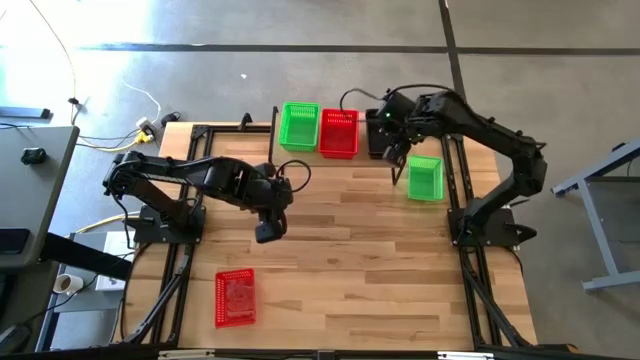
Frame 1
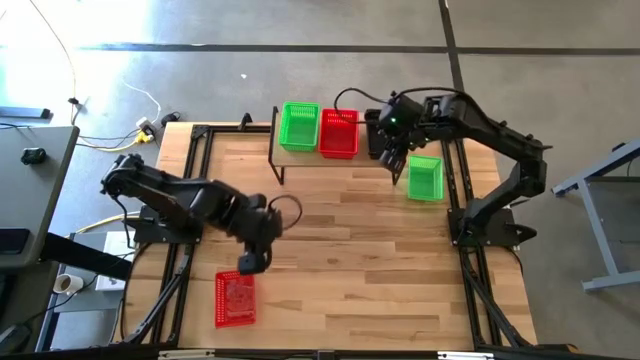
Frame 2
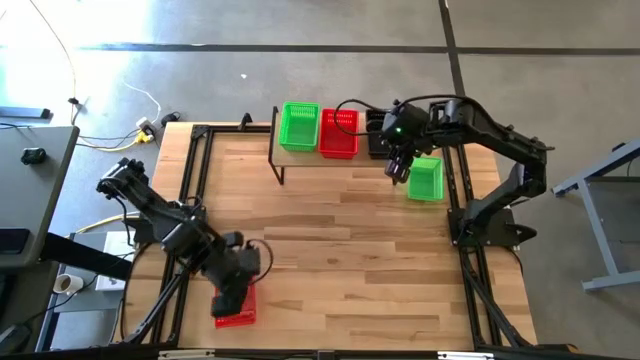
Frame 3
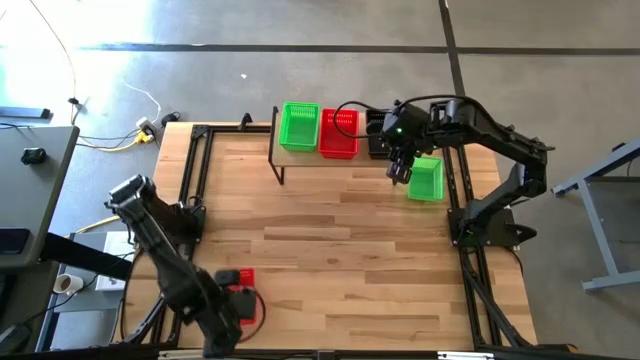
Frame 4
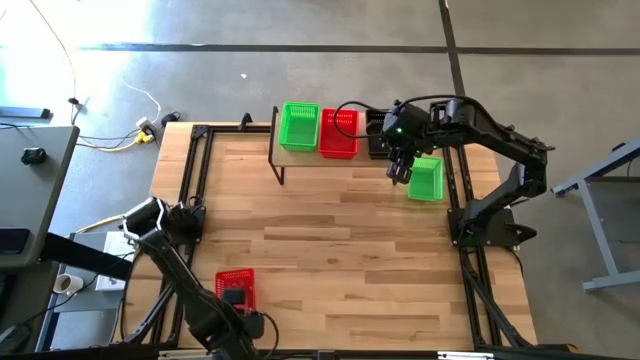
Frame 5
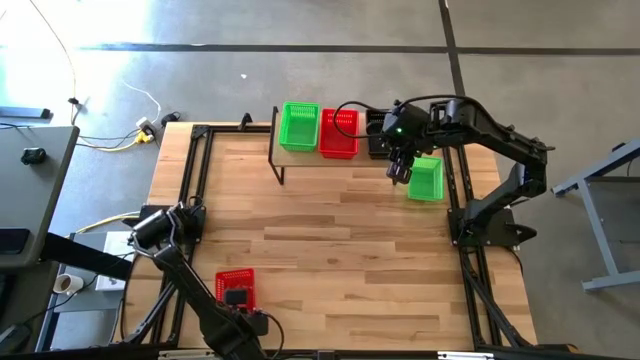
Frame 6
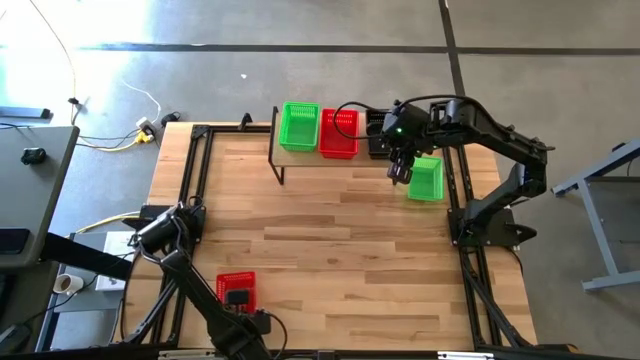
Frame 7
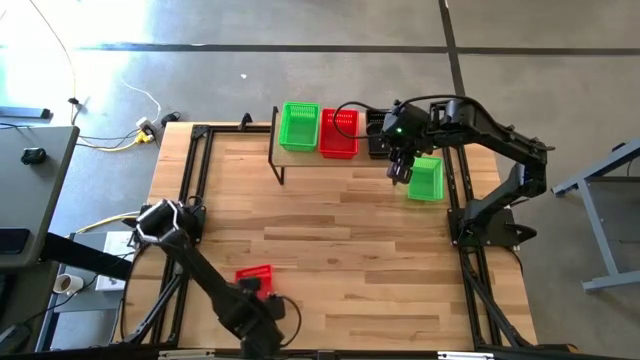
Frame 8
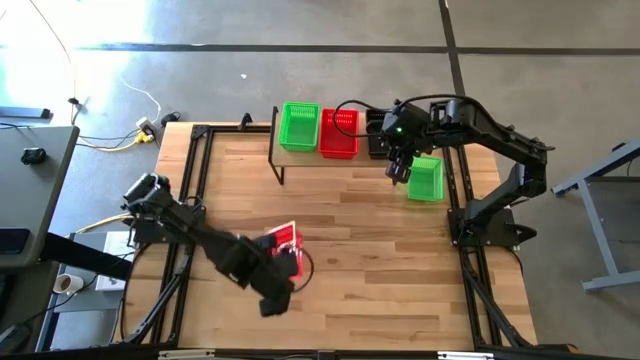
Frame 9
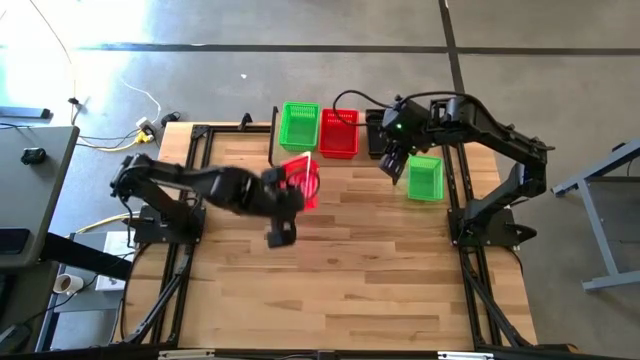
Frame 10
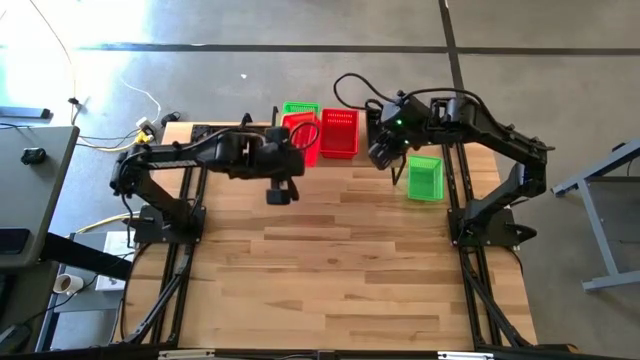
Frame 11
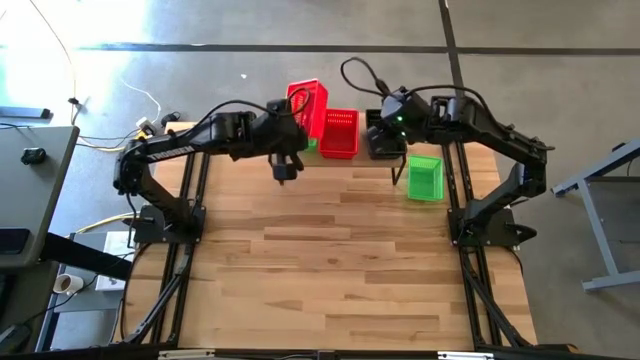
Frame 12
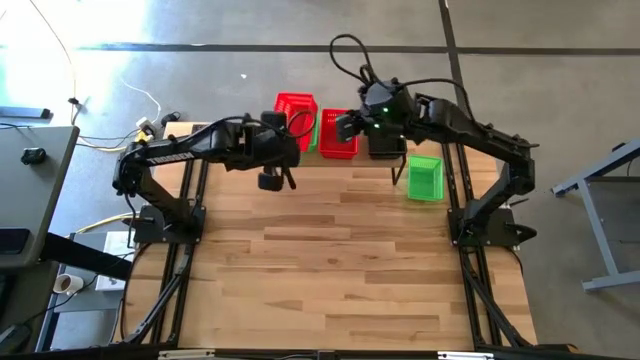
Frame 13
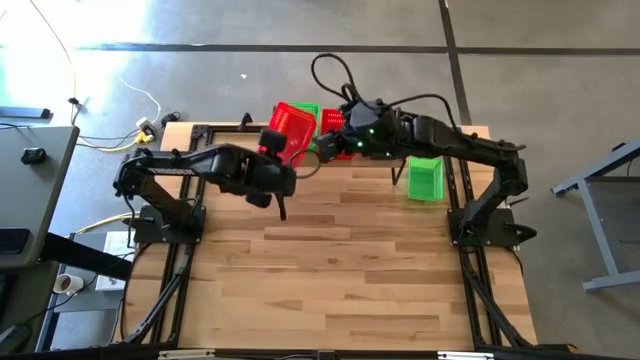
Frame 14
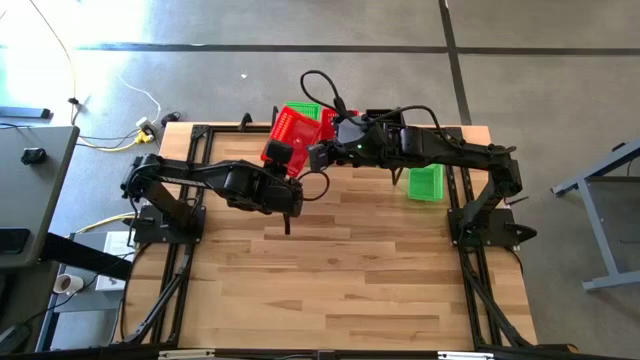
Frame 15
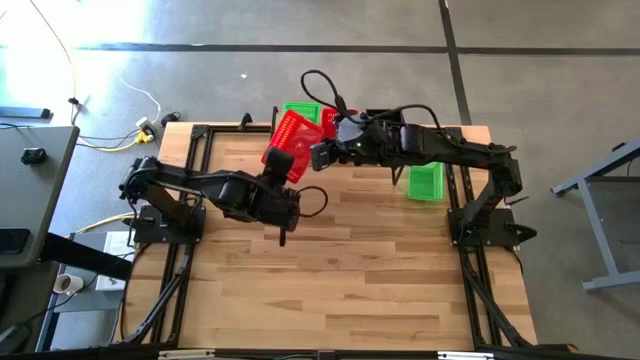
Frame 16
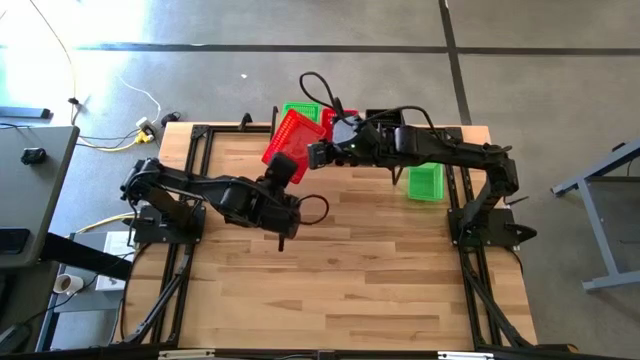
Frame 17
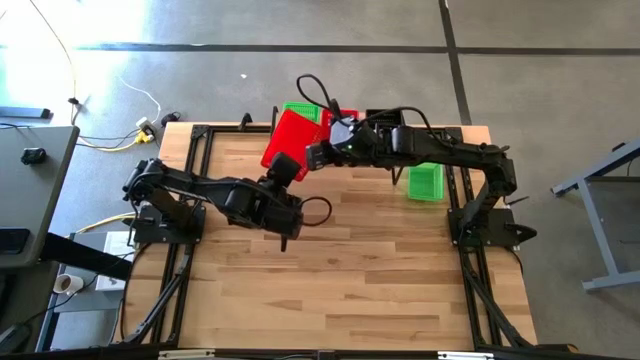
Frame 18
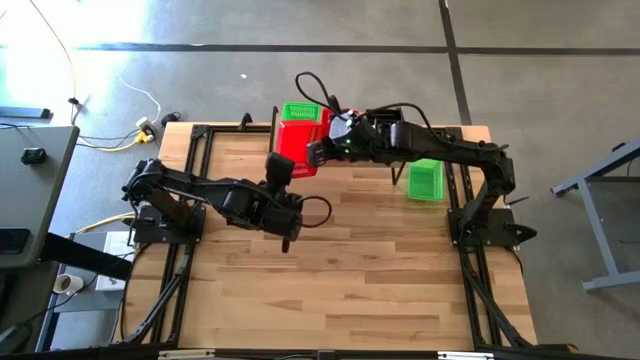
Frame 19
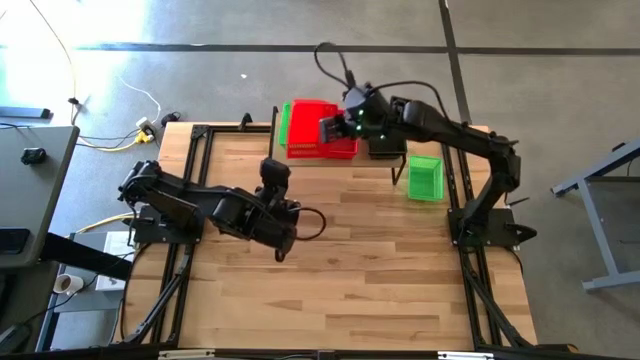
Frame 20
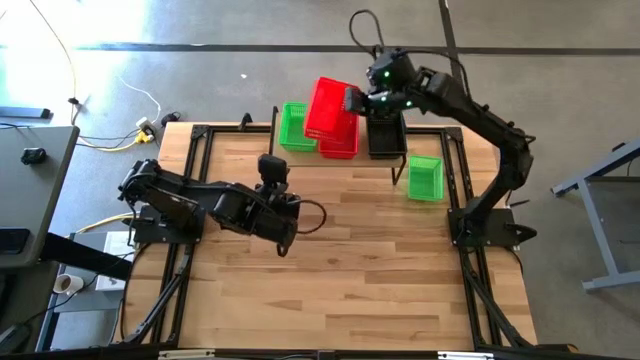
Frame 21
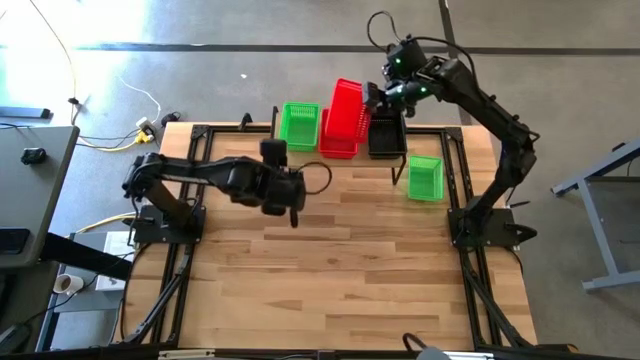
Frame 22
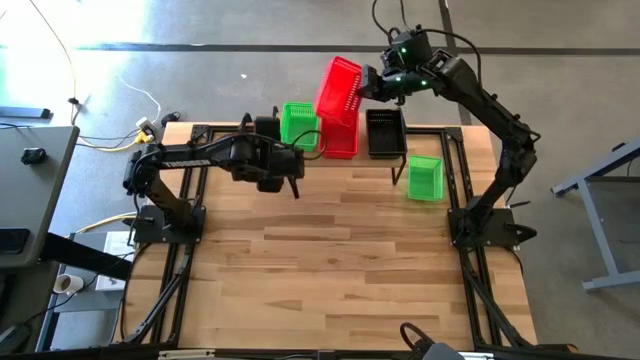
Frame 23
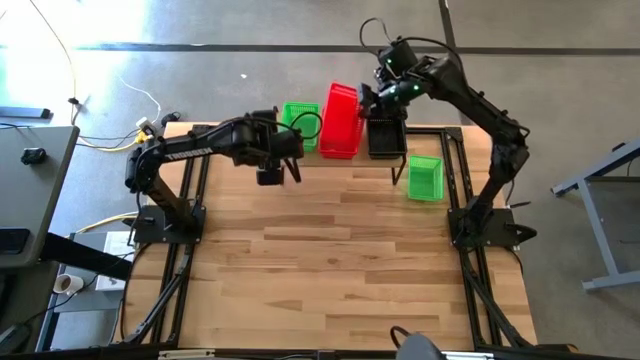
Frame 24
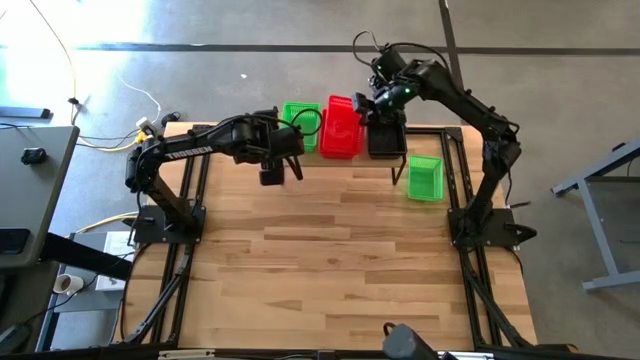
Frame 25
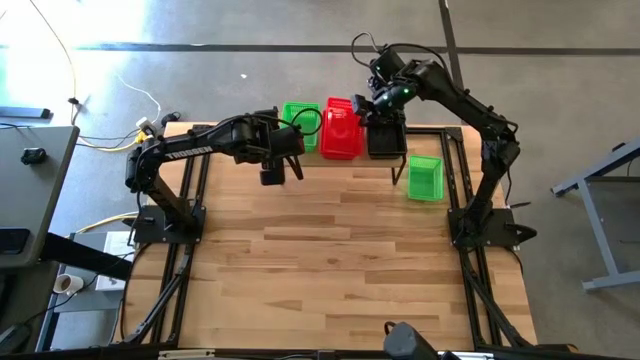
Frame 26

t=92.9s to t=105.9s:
Task: Stack baskets on shelf by color
Stack the red bin on top of the stacked red bins on the shelf

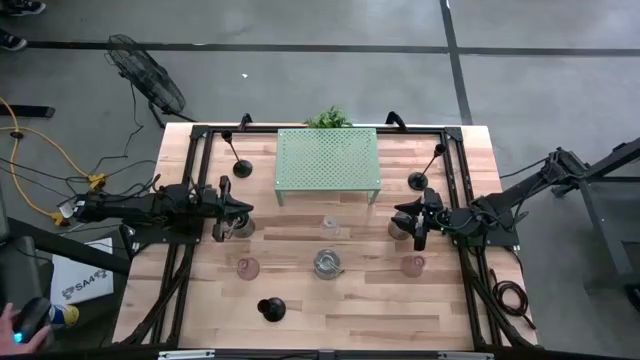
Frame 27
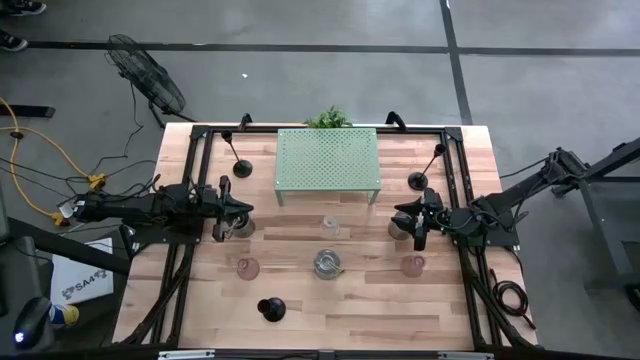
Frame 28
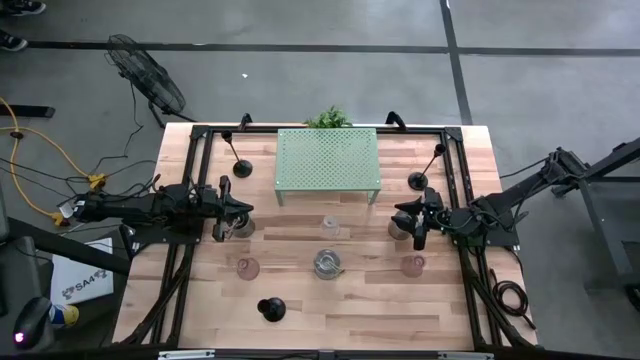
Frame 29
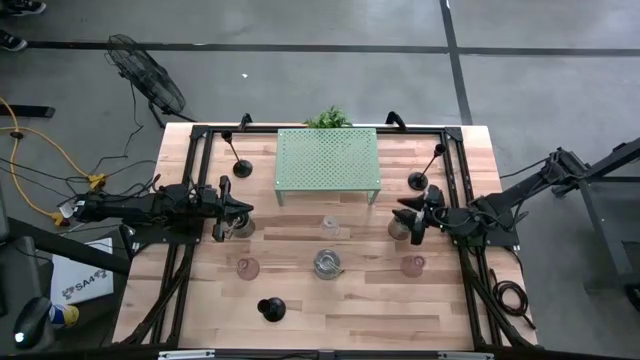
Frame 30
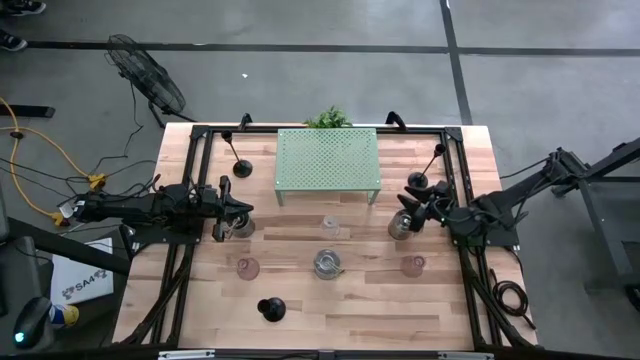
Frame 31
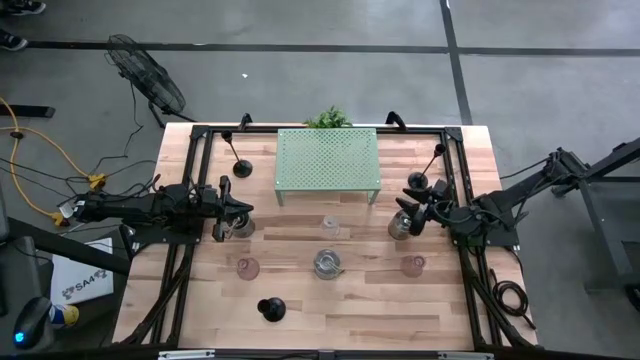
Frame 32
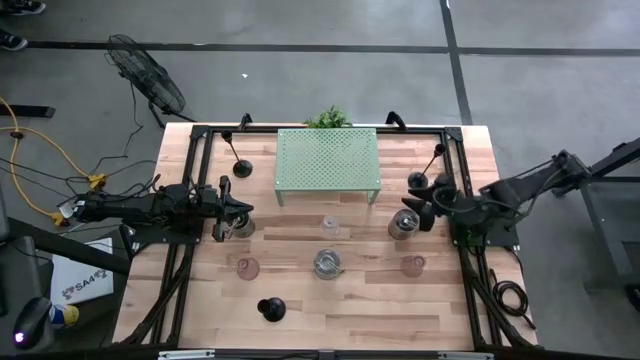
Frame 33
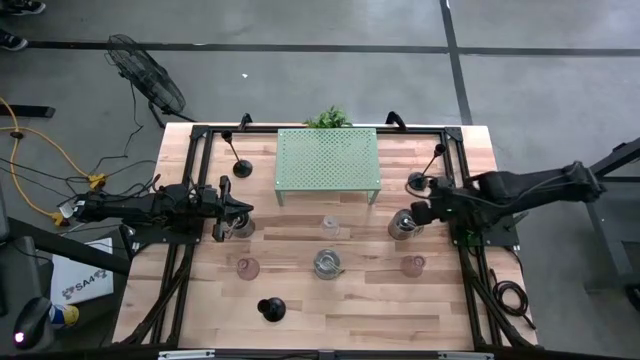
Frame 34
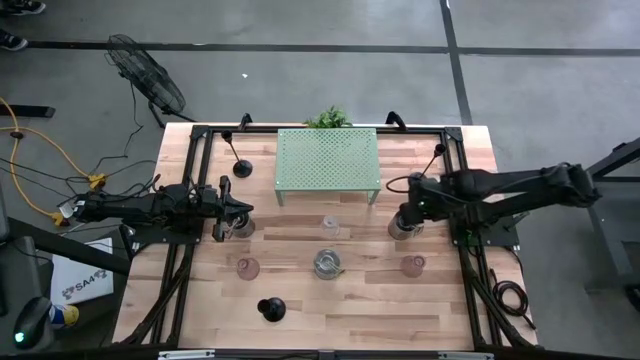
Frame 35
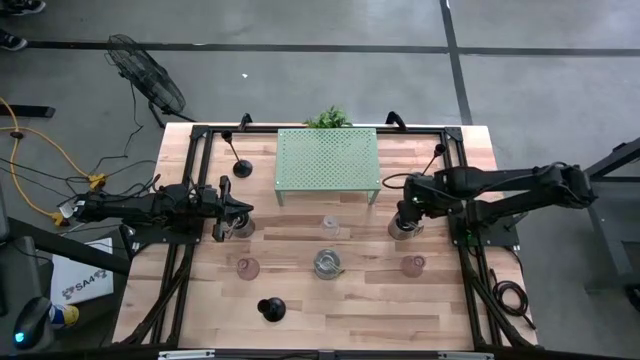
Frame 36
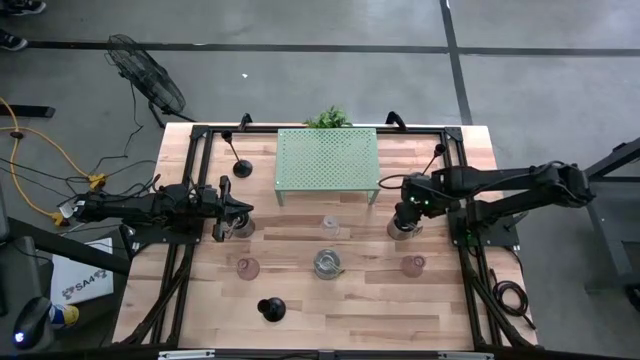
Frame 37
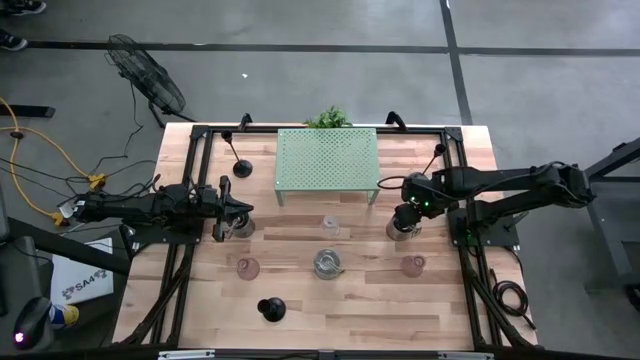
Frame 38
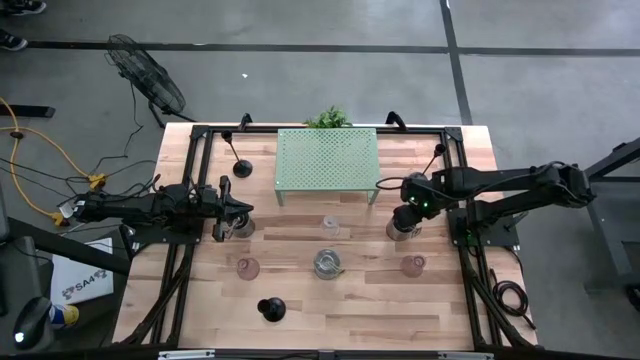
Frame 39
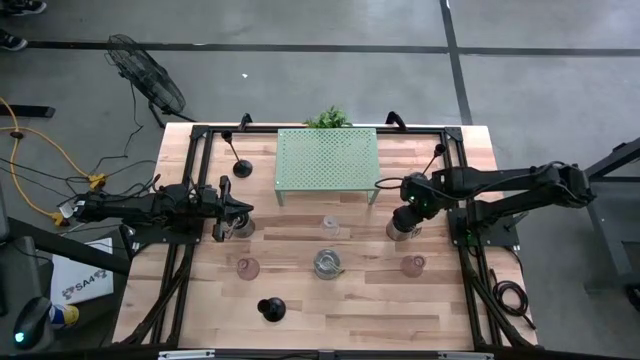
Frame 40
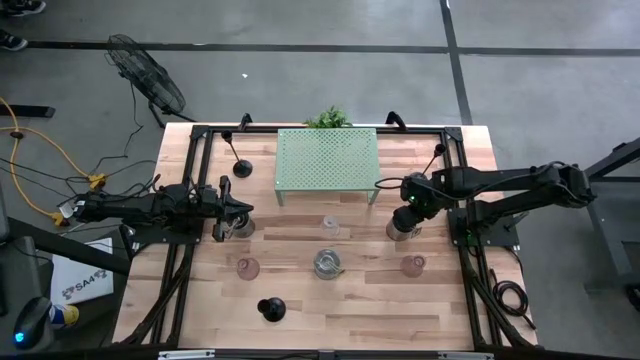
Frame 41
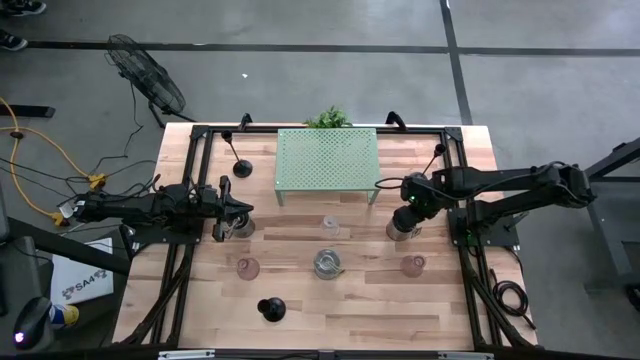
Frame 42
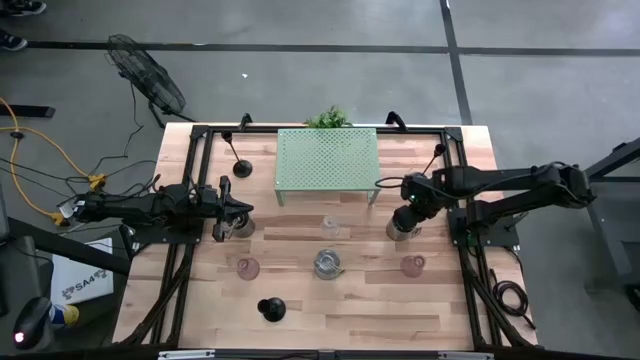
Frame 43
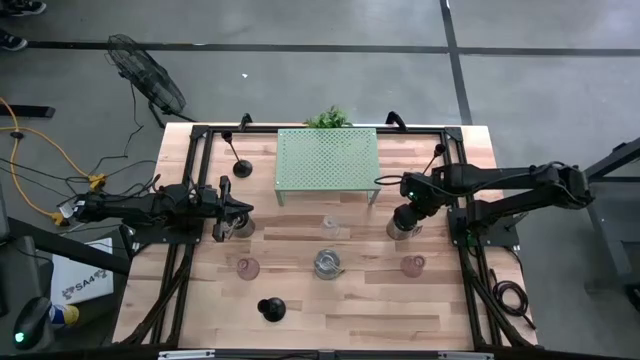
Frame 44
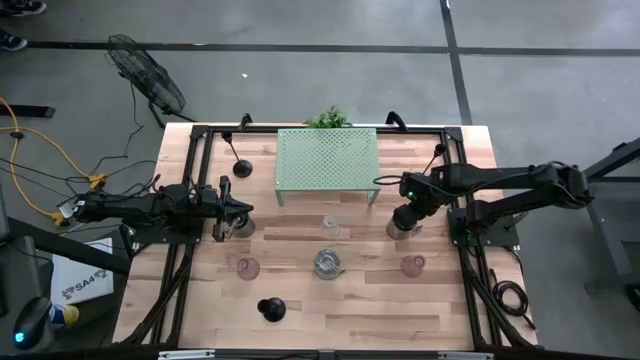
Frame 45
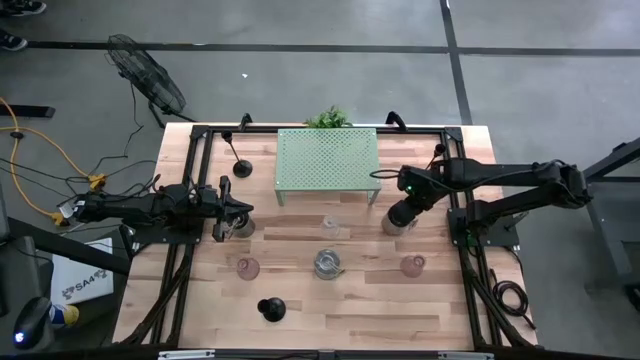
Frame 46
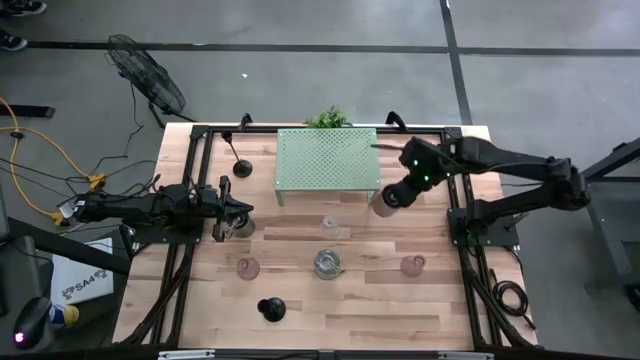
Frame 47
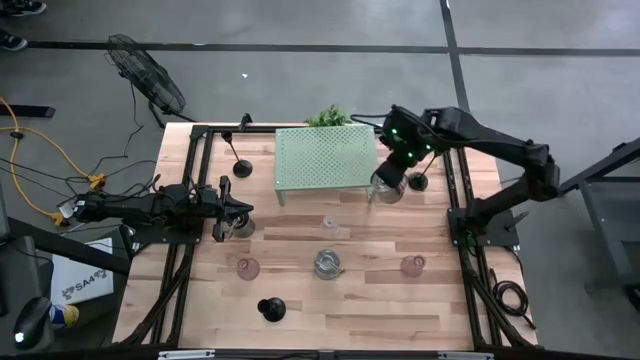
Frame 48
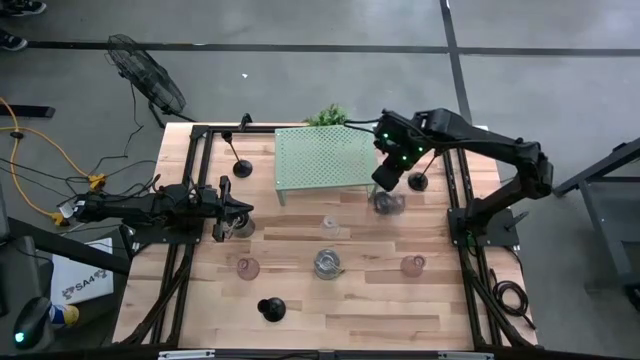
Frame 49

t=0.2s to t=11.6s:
Task: Pick & Place candle stick holders
Put the top right silver scented candle on the shelf
